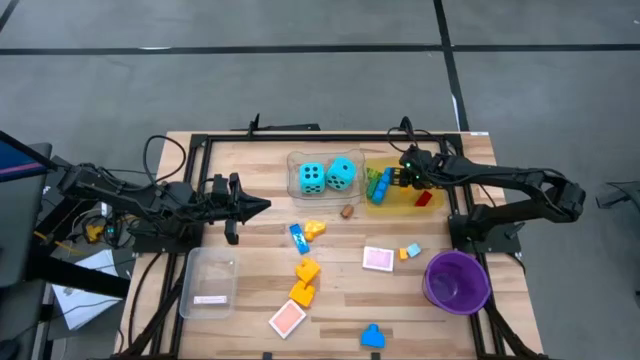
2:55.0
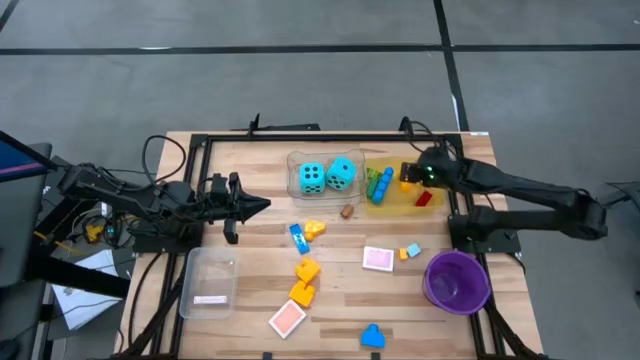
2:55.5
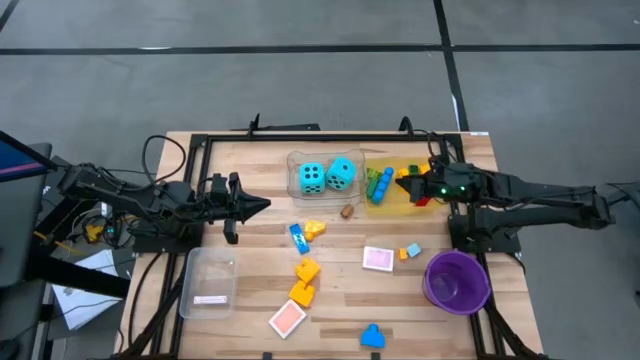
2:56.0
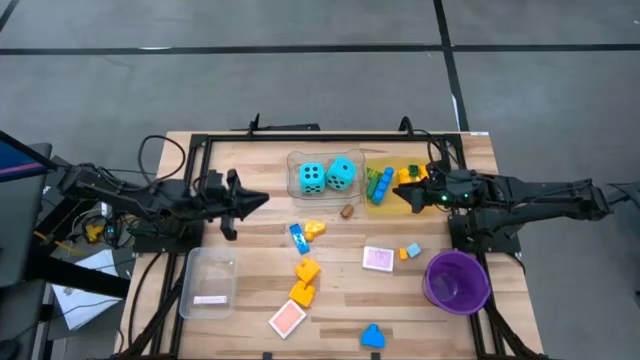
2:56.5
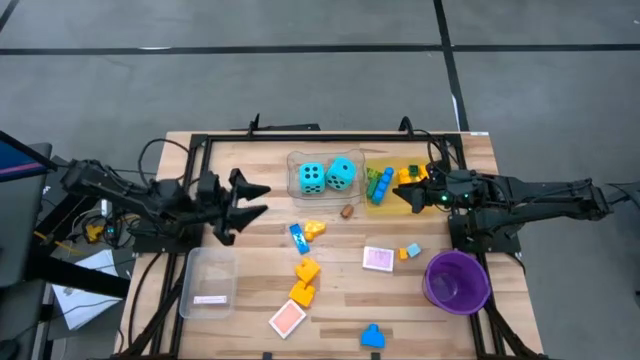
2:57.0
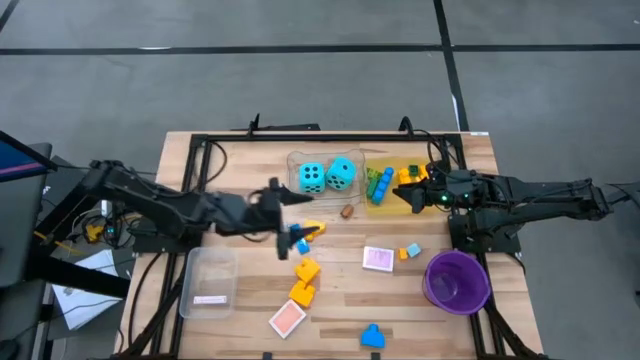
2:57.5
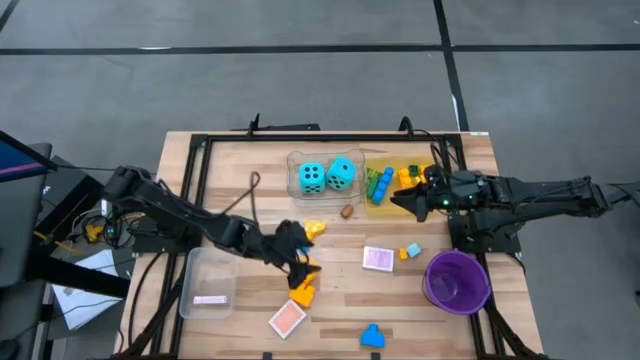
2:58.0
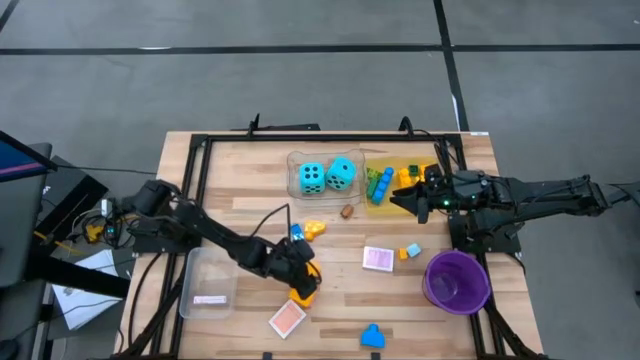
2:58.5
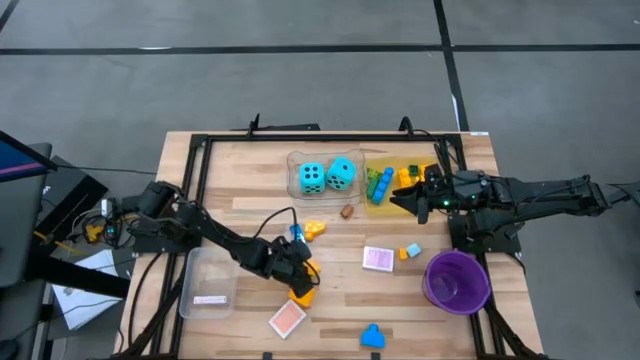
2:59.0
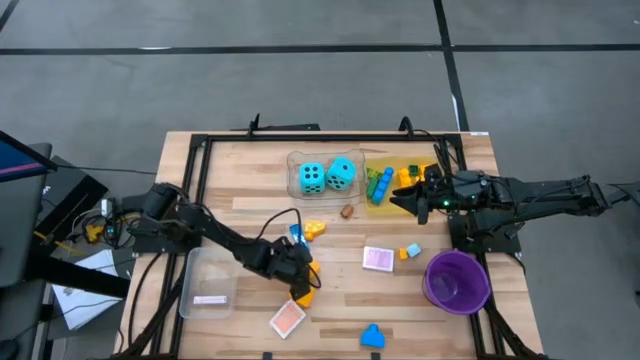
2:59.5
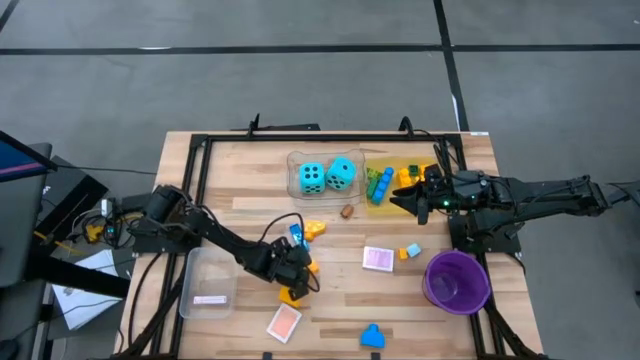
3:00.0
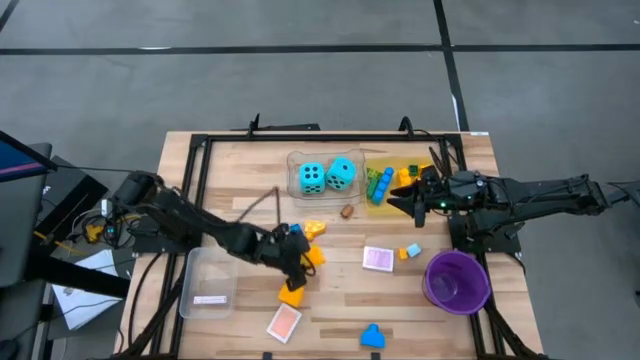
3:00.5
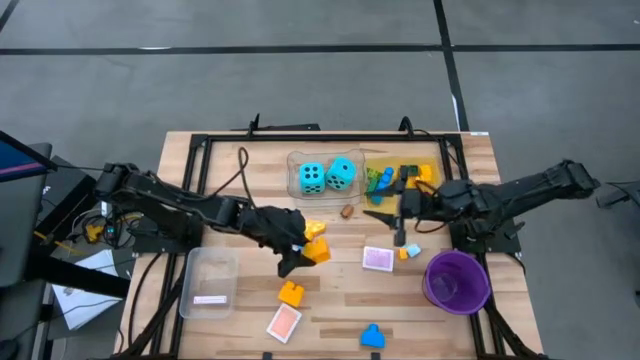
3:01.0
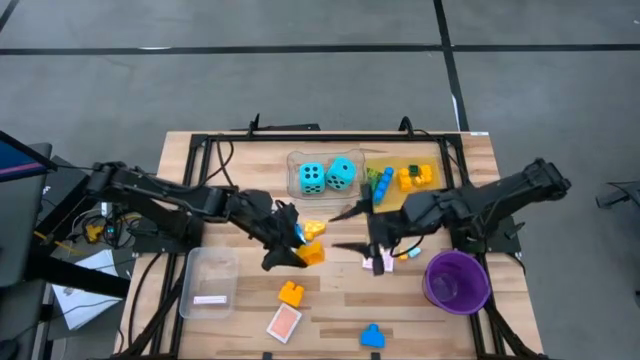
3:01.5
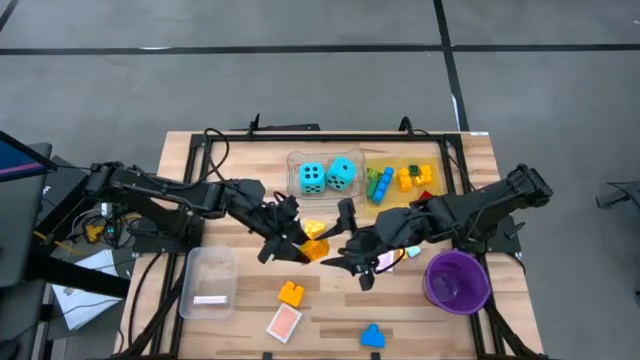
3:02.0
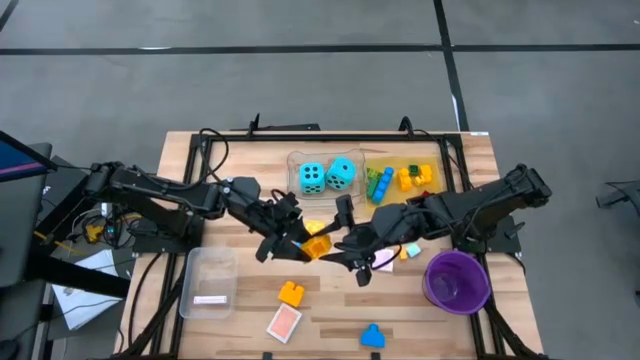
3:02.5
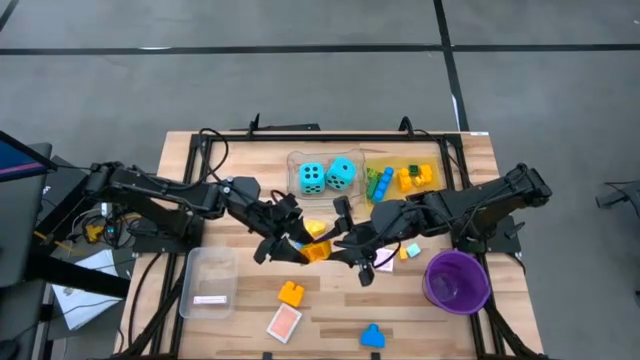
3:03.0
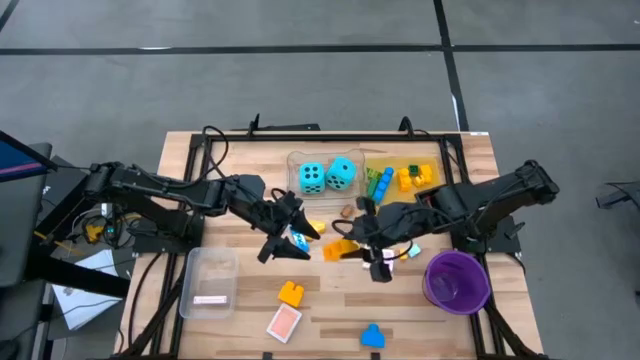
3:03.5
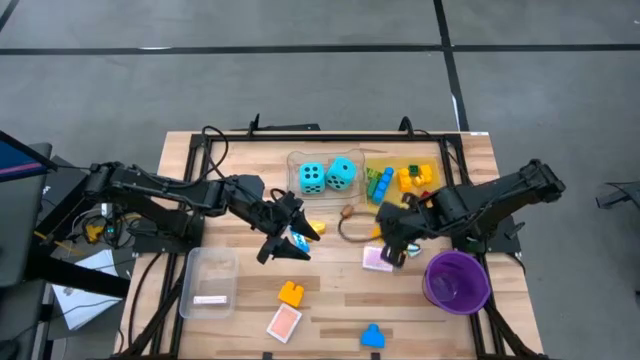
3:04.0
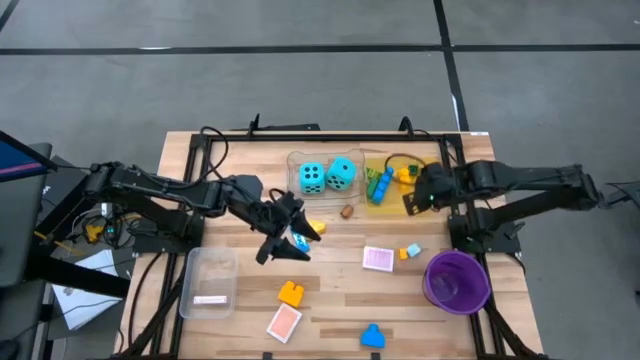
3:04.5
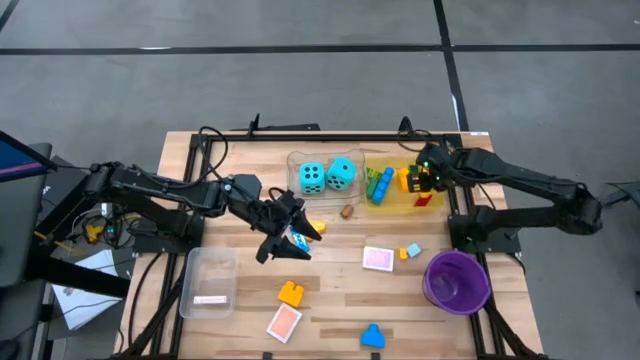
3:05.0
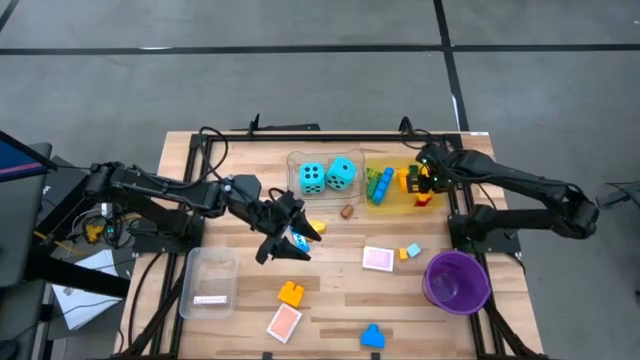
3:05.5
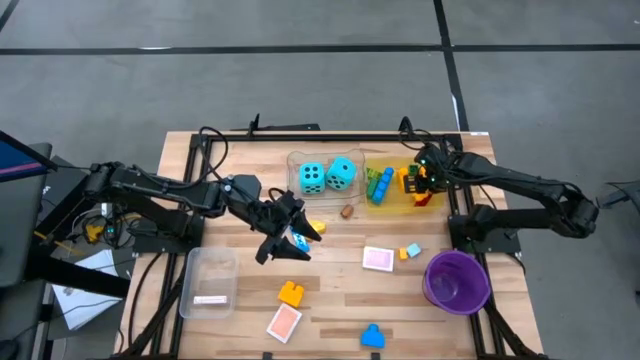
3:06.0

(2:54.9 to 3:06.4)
Task: Pick & Place Toys
Put the yellow game piece into the yellow bin

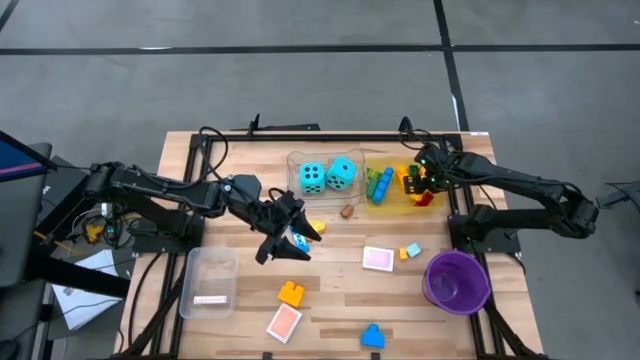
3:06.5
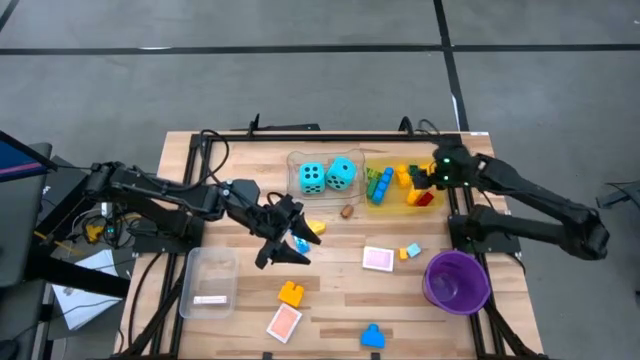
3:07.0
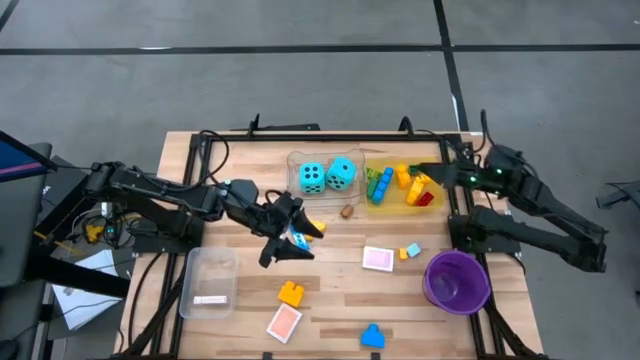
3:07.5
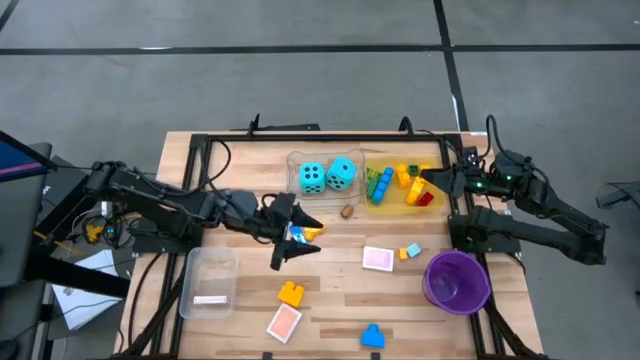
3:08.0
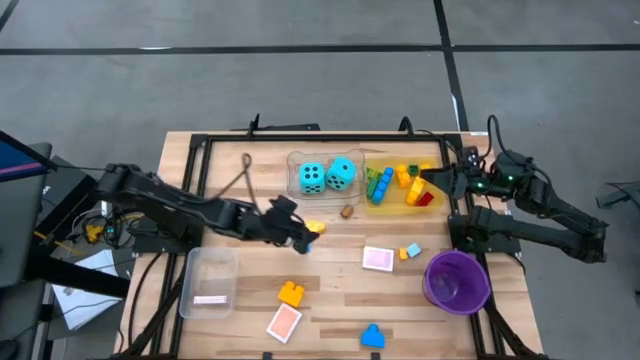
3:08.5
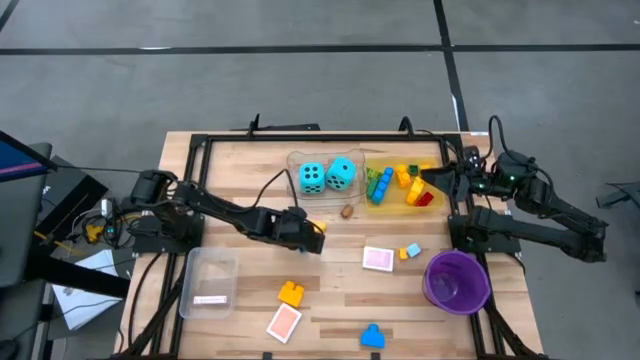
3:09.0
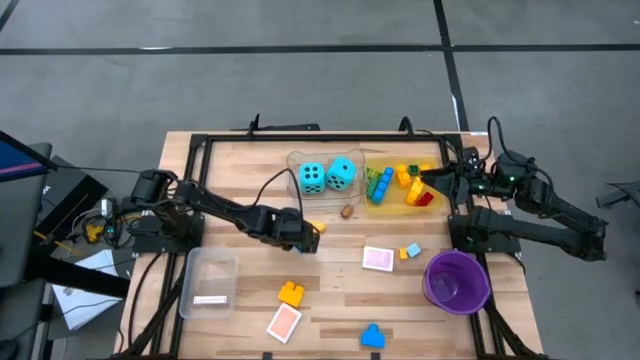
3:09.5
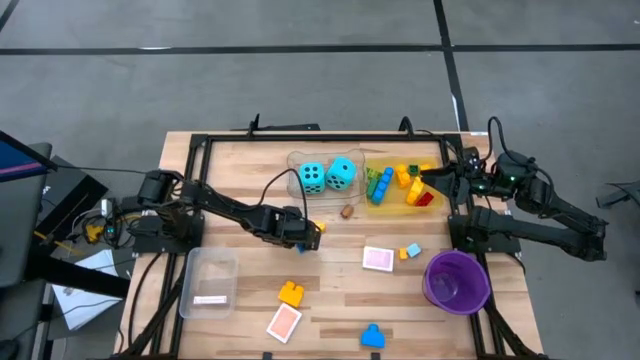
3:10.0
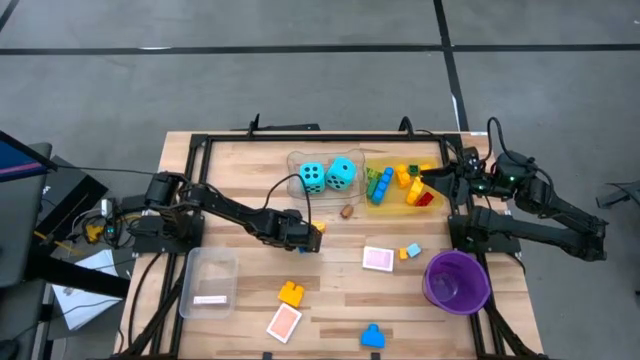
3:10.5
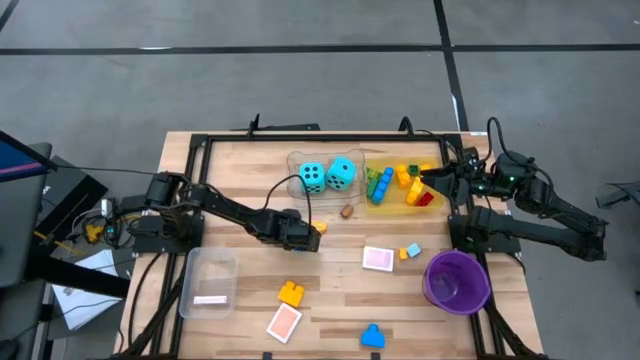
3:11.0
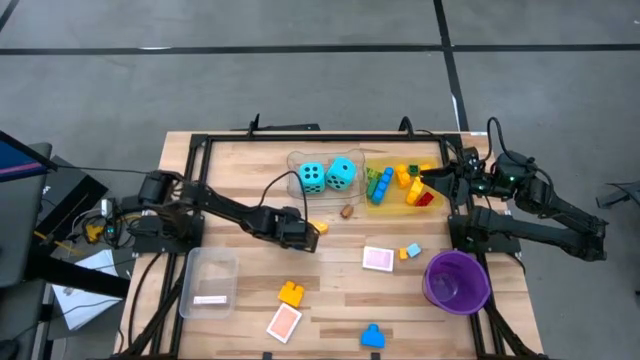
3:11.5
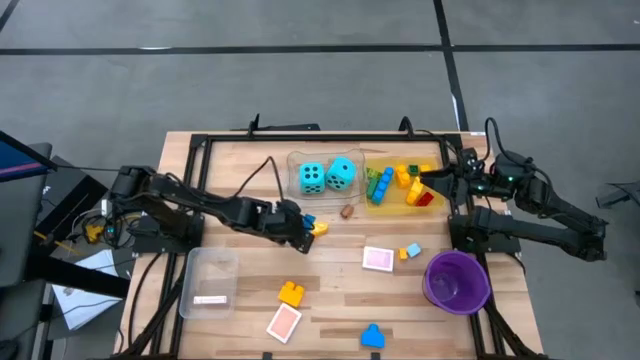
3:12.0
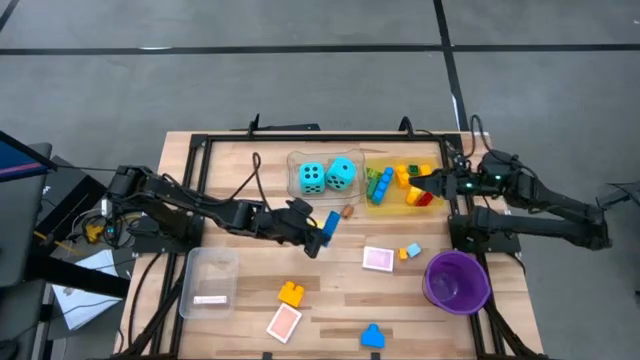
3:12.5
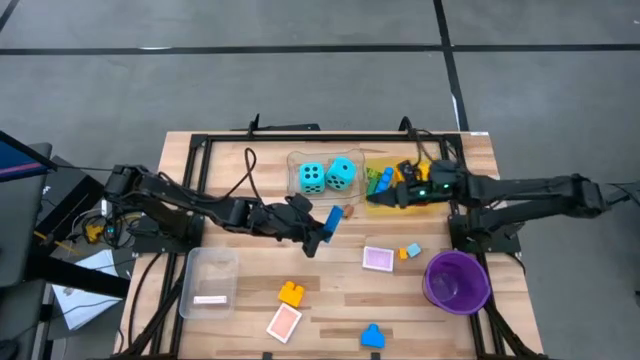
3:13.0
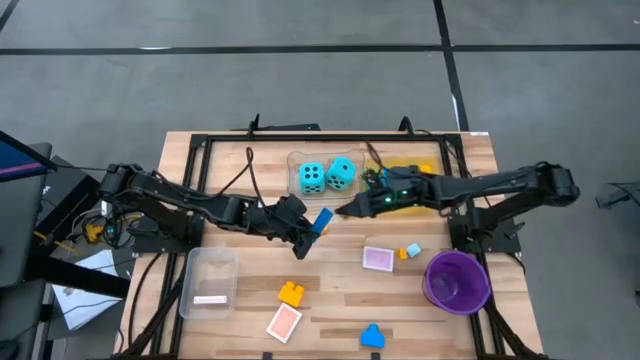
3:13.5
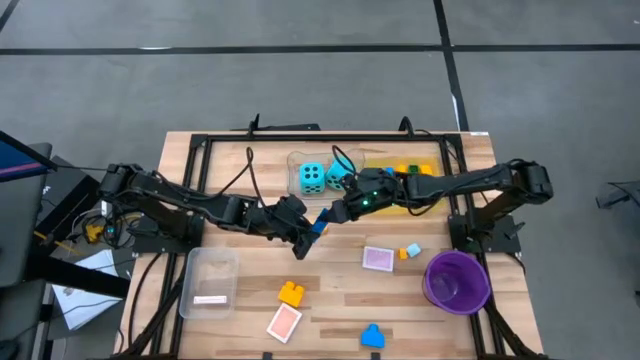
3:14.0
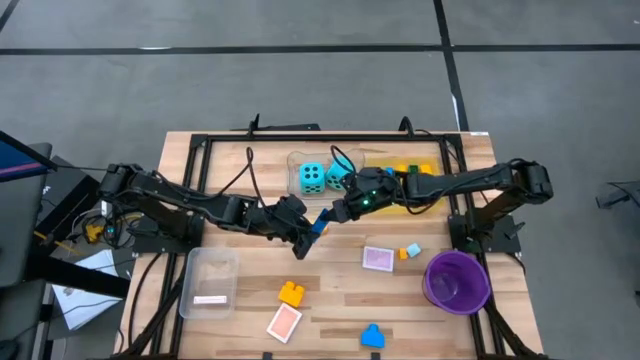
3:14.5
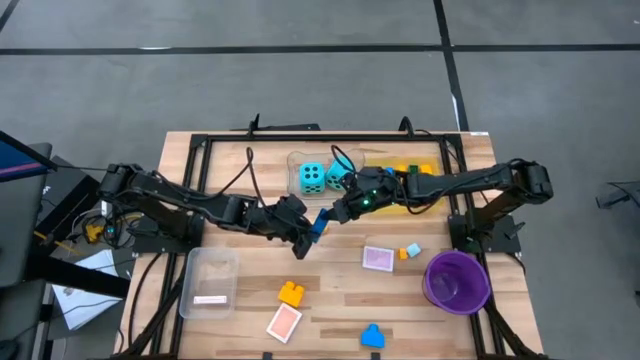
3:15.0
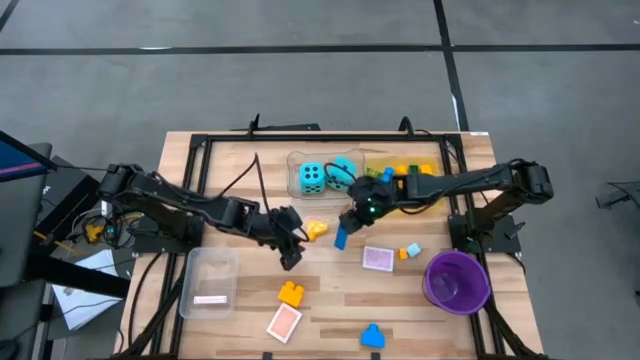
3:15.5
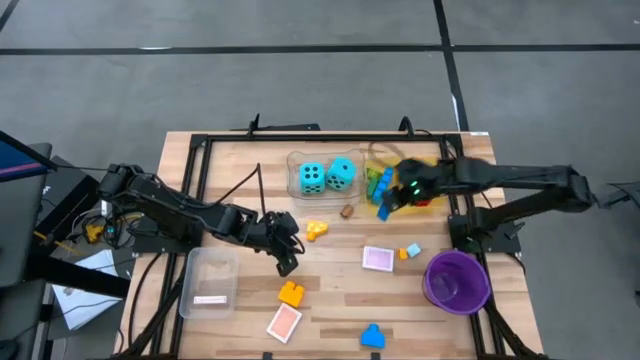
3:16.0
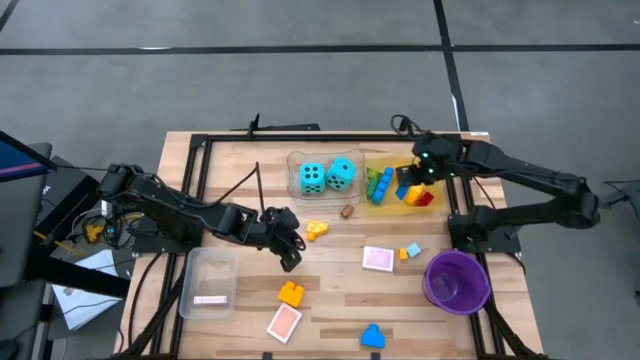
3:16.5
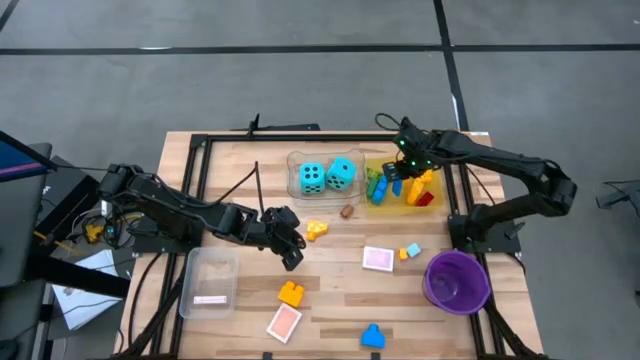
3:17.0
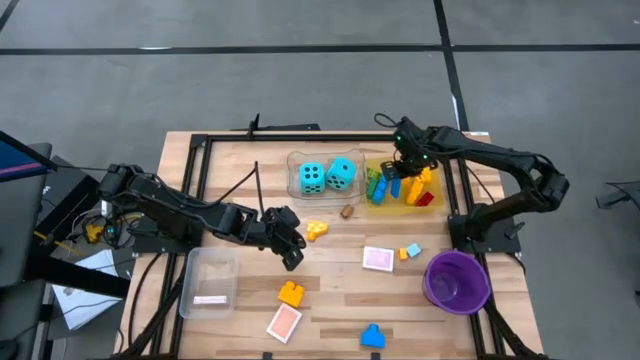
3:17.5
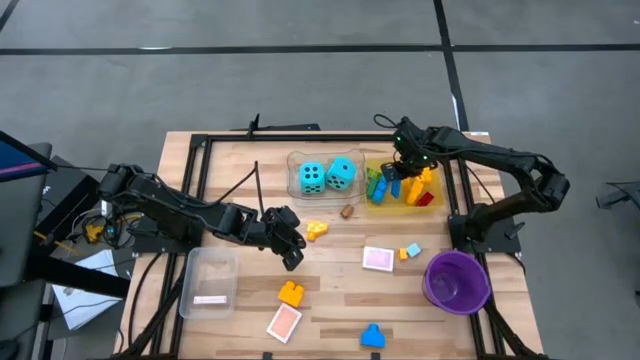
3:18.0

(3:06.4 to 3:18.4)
Put the blue game piece into the yellow bin
